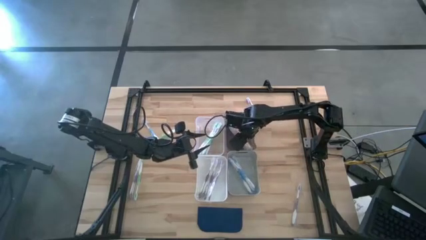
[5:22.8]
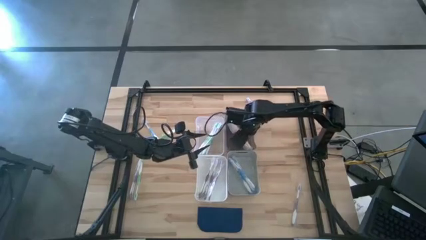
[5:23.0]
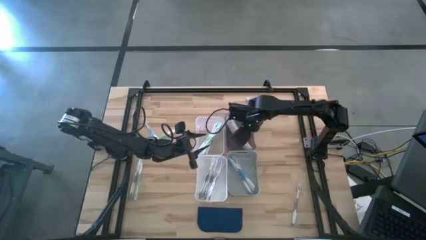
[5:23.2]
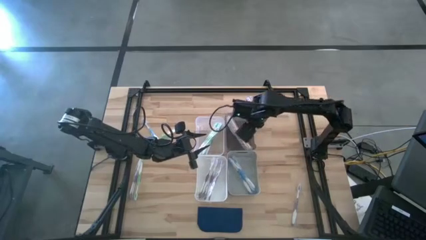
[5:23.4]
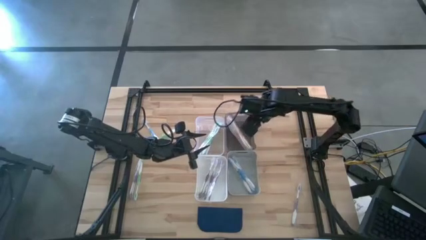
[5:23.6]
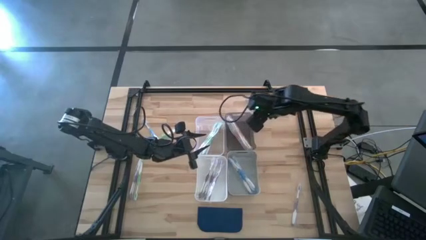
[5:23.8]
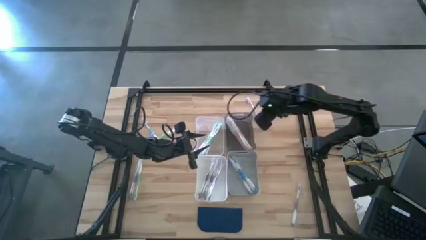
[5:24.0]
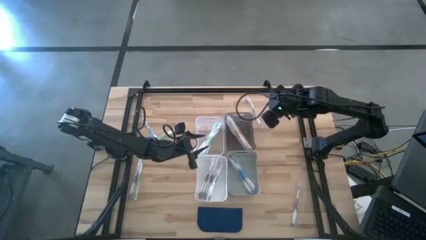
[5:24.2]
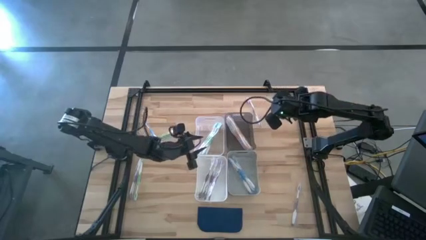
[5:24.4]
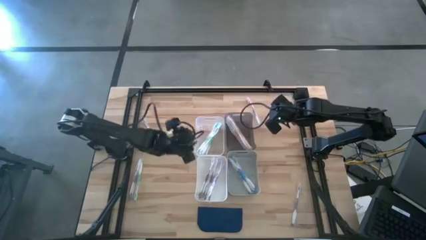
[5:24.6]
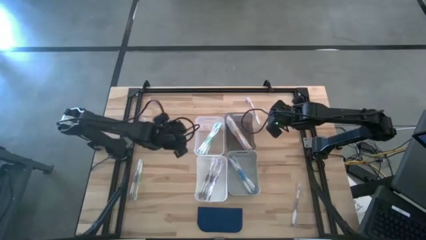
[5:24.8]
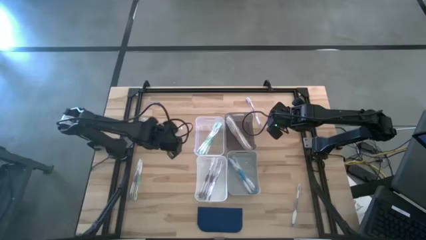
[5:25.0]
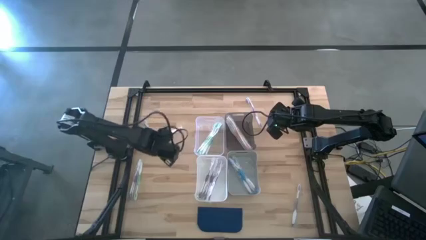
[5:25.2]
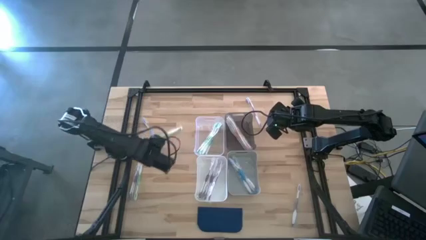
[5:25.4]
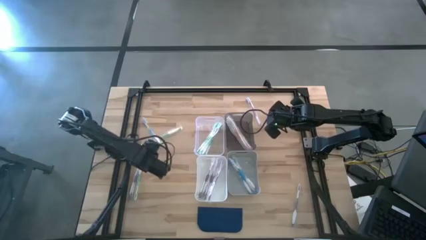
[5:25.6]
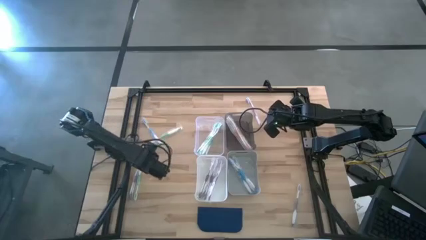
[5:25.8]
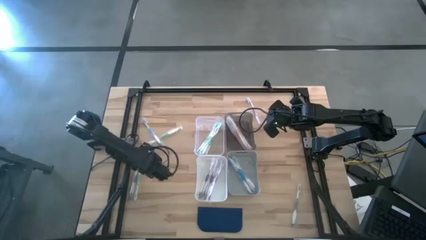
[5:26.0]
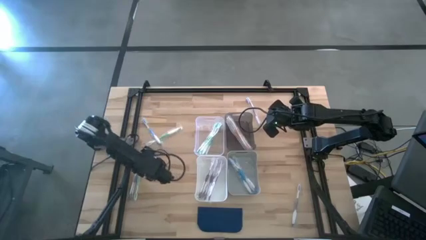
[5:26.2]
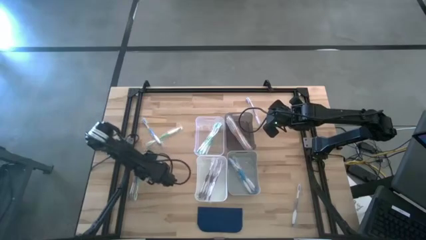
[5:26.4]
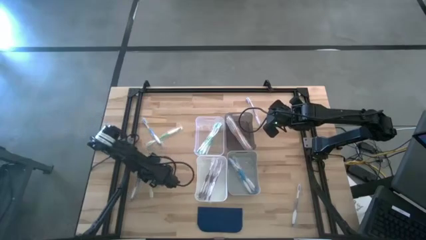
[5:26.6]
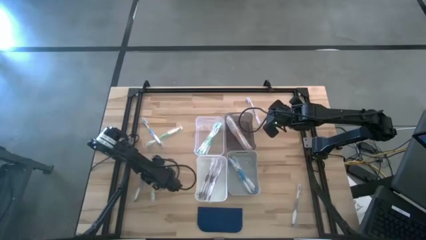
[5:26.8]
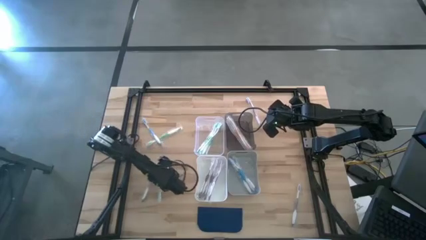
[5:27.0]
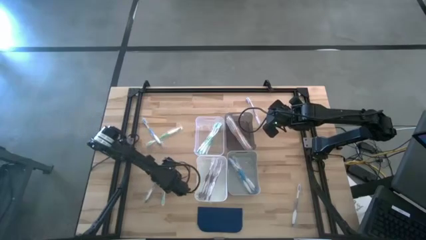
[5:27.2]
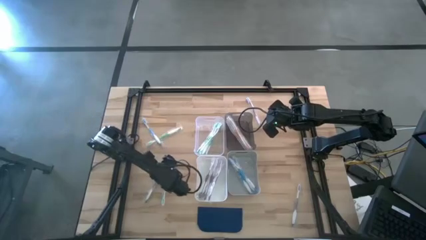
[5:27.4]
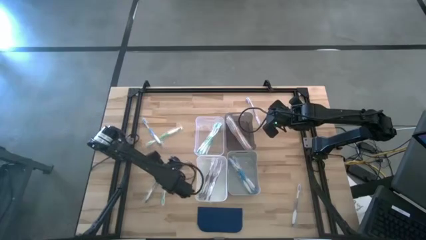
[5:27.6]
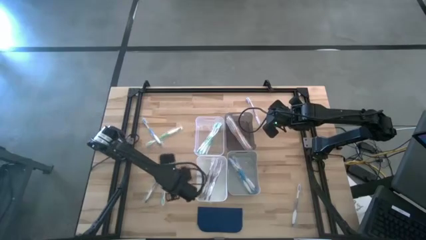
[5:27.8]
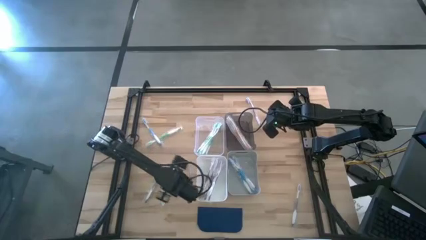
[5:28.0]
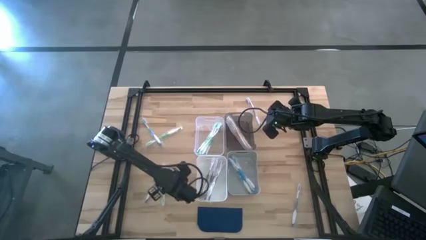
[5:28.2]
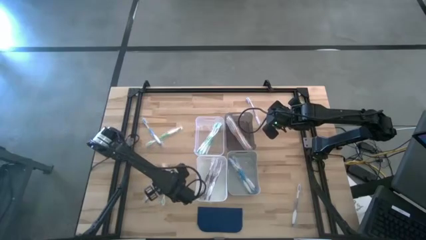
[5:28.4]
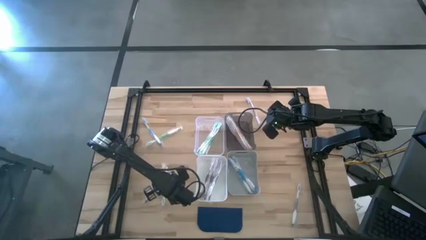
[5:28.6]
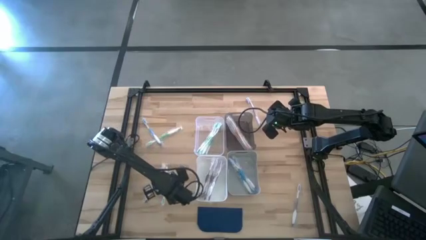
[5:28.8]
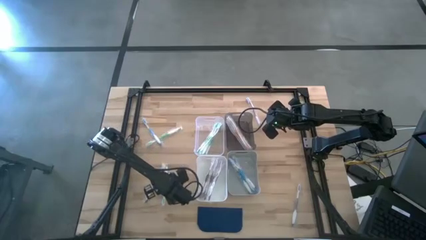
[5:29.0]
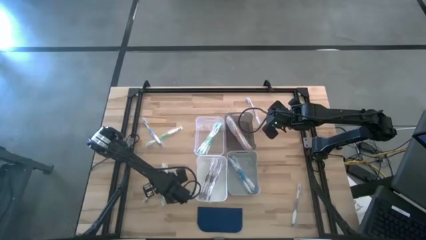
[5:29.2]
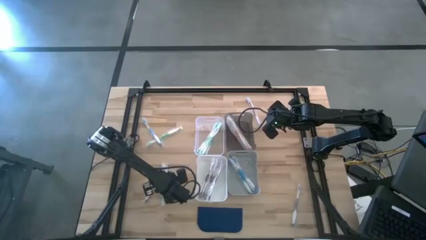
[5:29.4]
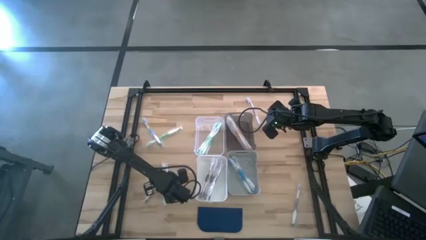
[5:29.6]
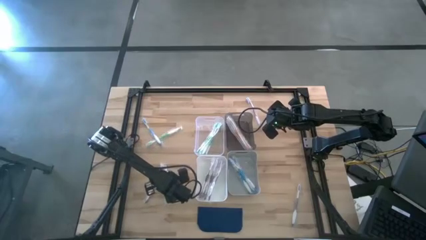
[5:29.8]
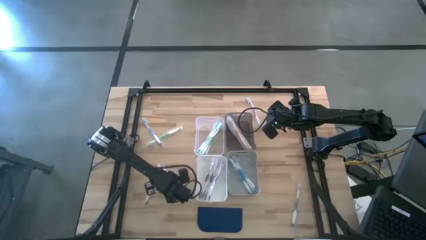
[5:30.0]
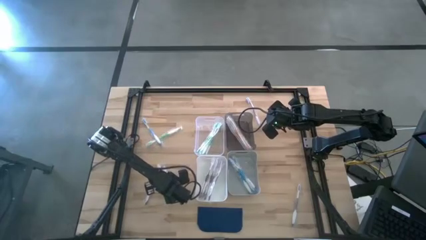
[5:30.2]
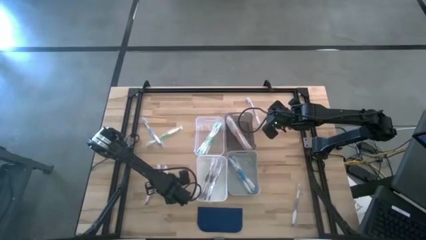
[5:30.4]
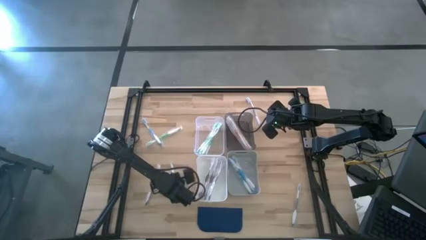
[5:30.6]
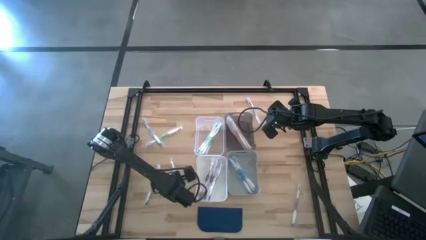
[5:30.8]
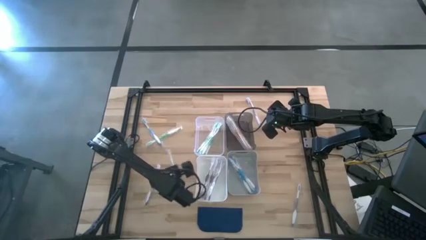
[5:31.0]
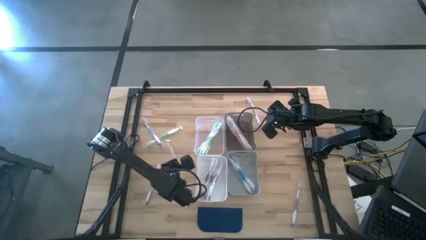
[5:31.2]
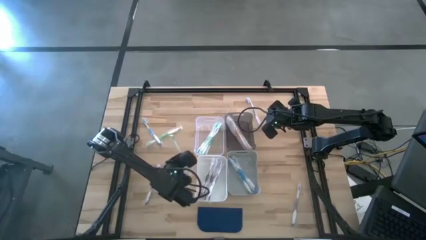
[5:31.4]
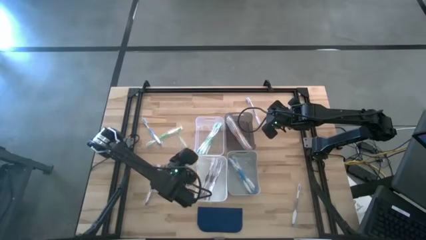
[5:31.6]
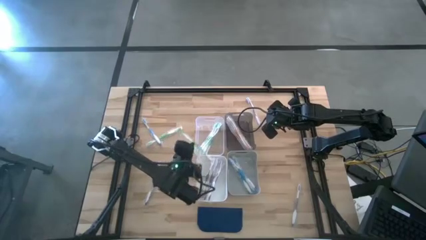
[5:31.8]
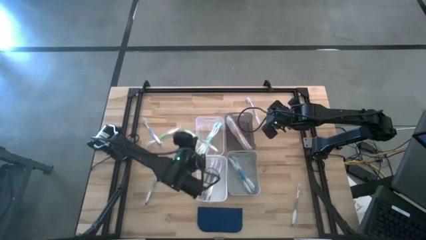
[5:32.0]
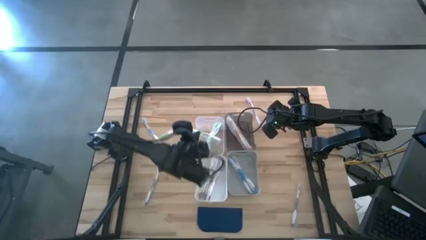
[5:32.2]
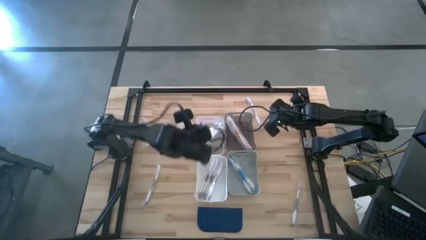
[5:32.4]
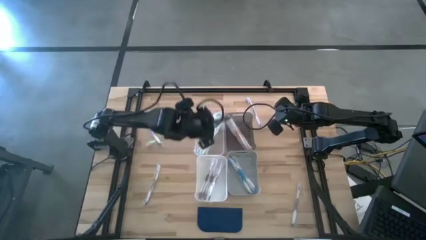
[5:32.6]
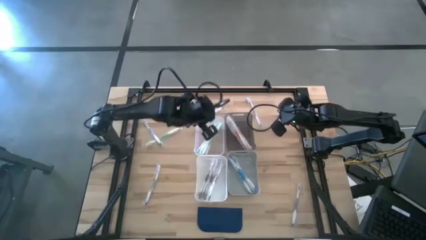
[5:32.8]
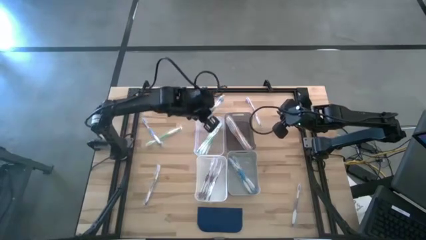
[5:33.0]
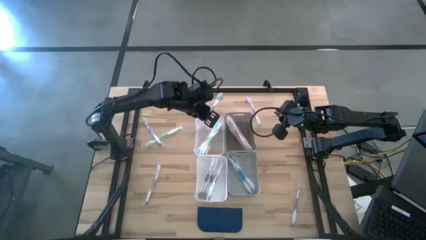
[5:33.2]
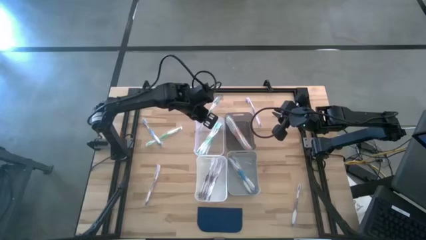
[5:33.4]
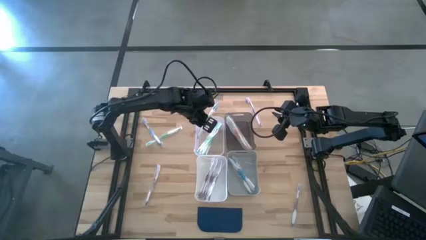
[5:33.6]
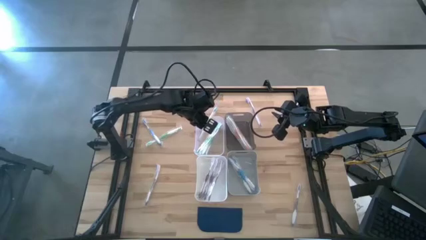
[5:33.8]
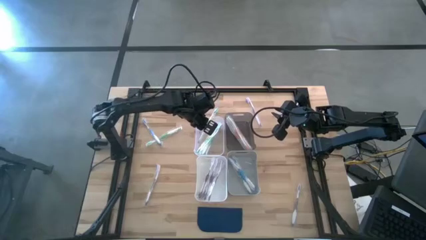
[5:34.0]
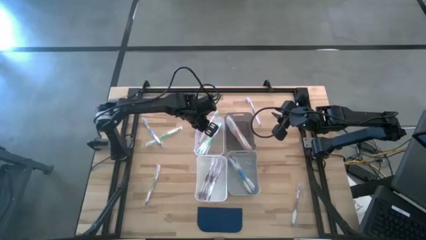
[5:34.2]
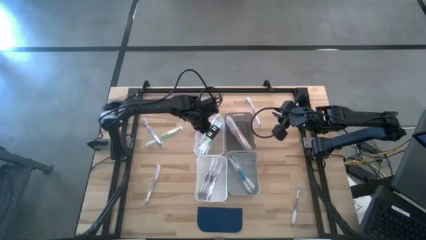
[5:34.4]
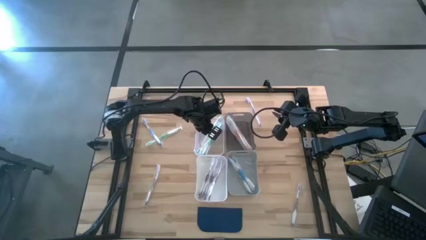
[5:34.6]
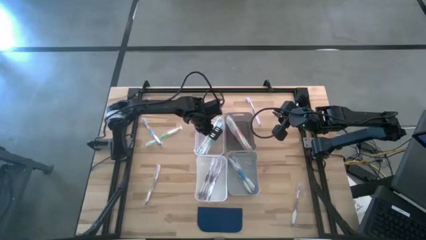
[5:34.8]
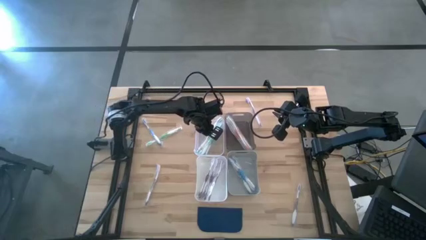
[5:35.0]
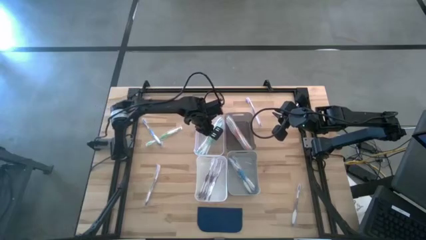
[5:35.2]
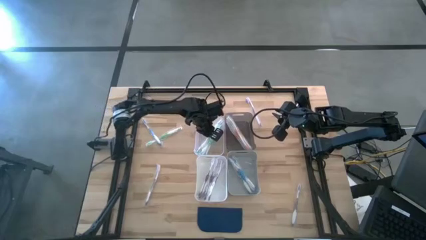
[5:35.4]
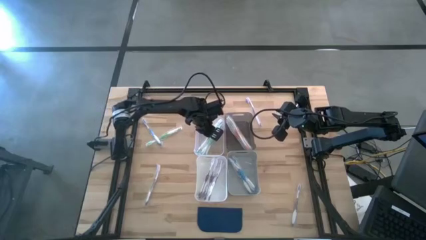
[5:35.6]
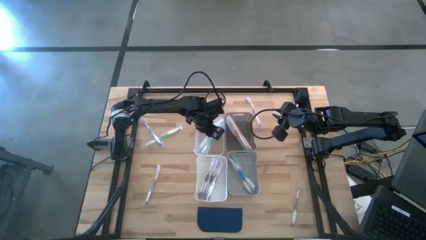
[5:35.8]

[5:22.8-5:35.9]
Task: Pick & Place Toothbrushes
Put the green toothbrush into the transparent bin

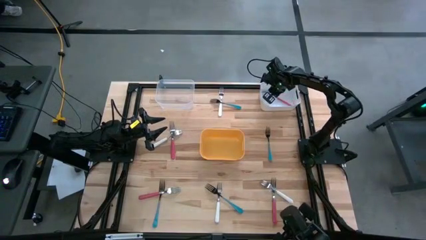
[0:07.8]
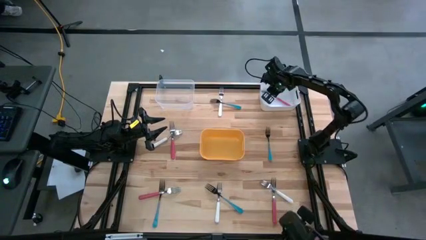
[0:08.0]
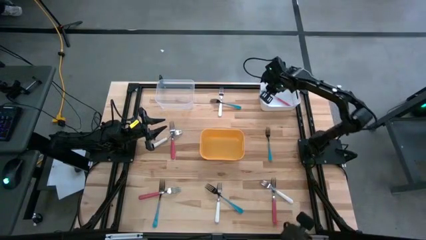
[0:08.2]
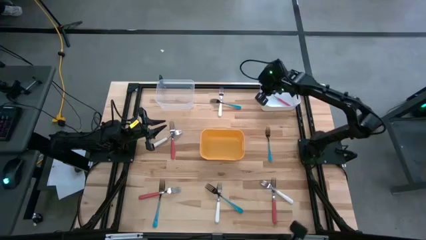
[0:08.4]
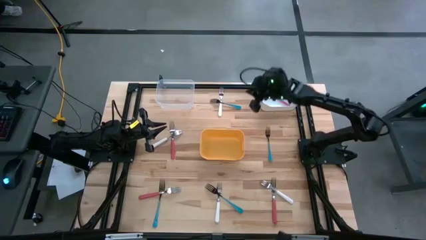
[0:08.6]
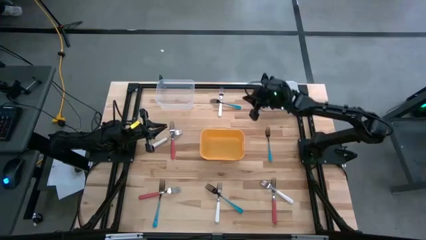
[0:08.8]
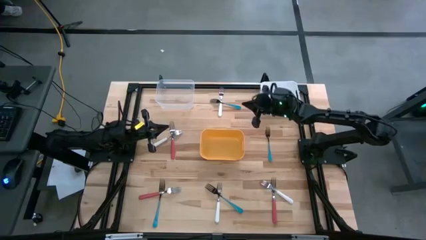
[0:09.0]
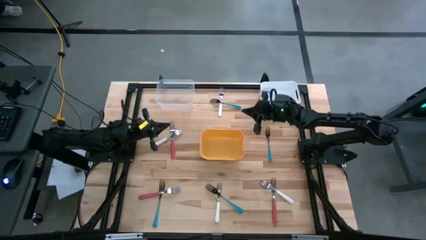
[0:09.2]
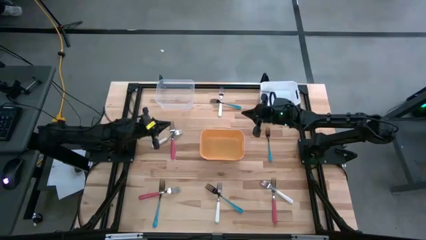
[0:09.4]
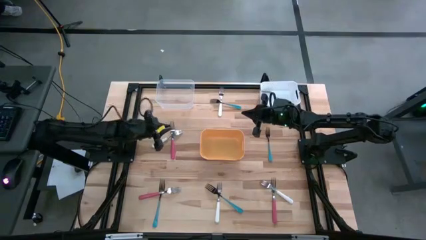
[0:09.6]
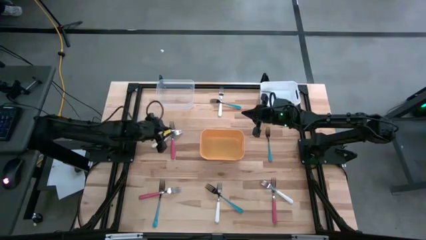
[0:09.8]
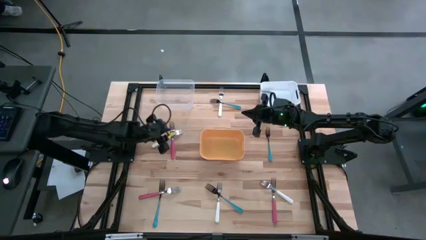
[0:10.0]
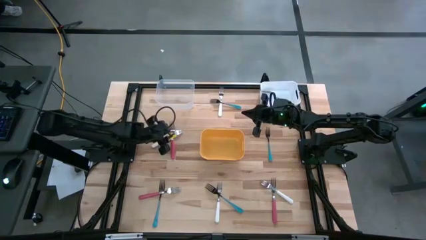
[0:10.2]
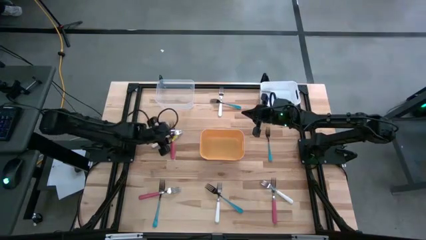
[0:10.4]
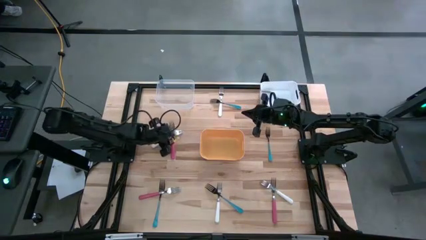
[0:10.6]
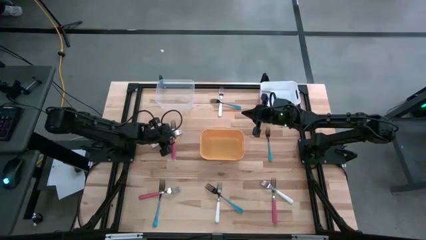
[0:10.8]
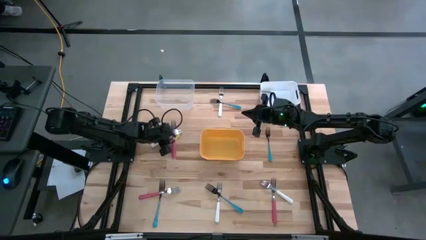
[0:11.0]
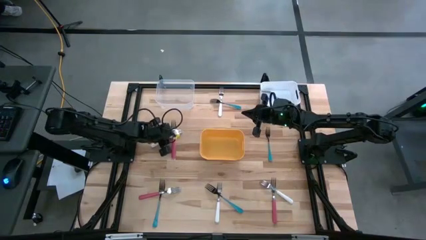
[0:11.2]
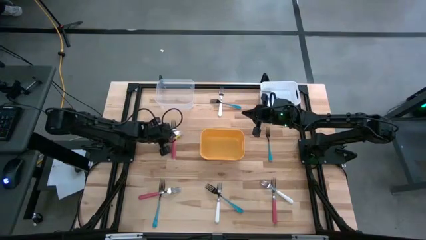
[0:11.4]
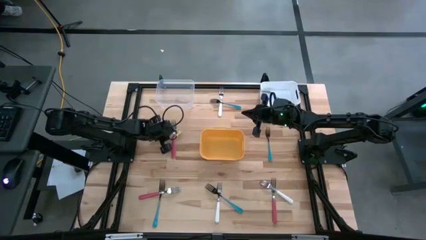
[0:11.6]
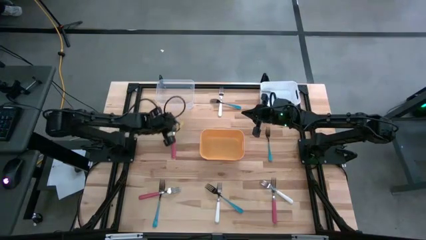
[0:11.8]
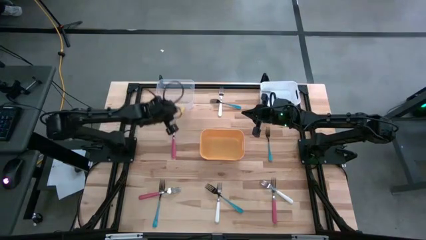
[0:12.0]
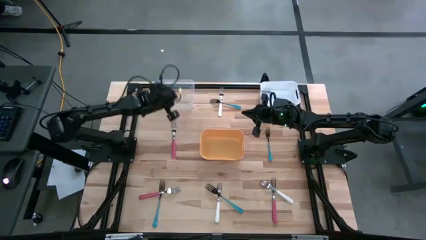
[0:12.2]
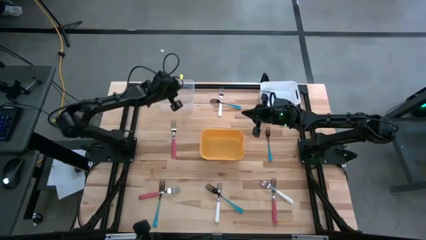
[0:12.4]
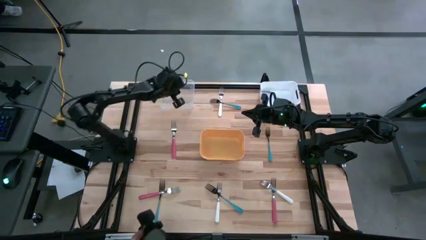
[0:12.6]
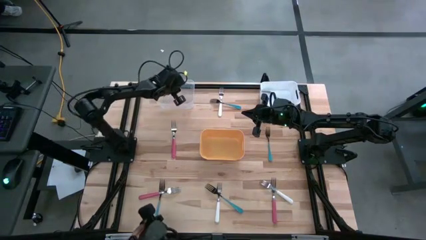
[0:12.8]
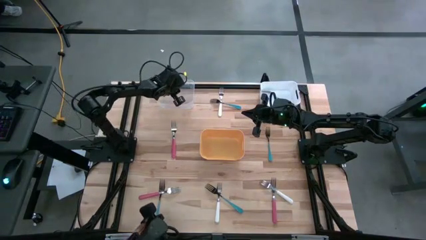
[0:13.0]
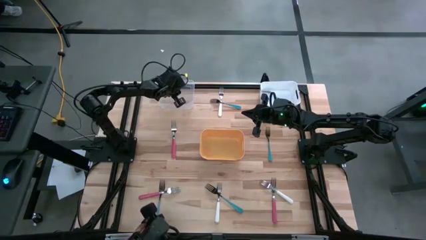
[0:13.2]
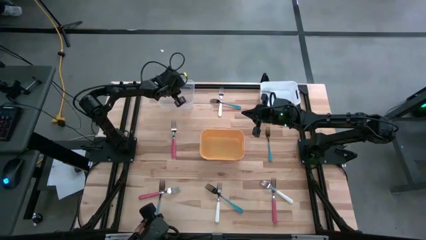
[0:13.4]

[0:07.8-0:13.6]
Task: Sort silverware by color (type)
Put the white fork into the transparent bin
